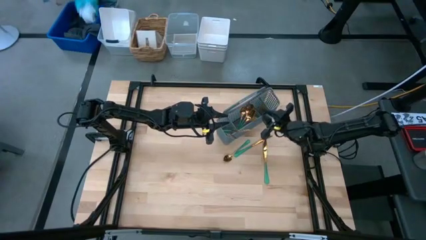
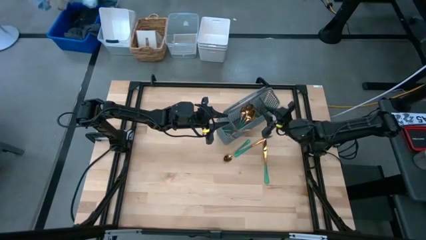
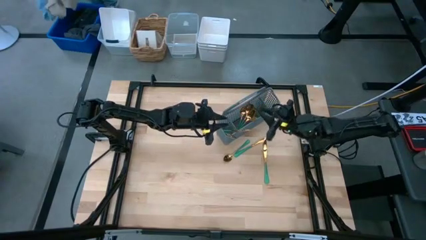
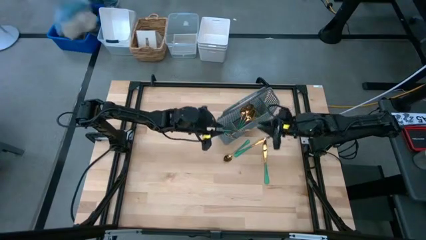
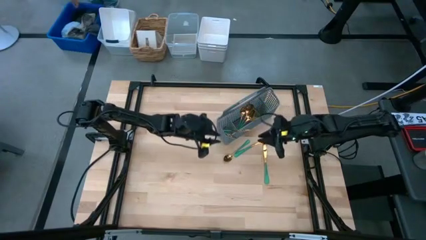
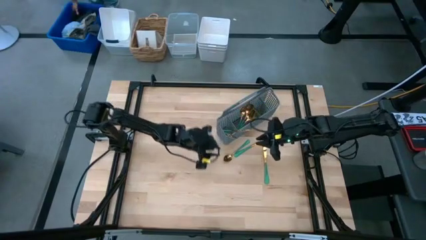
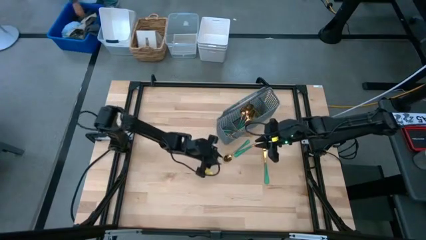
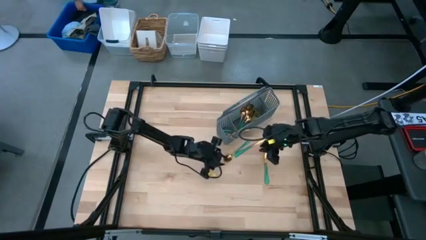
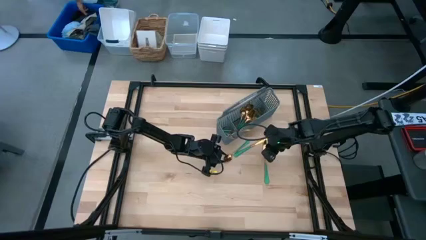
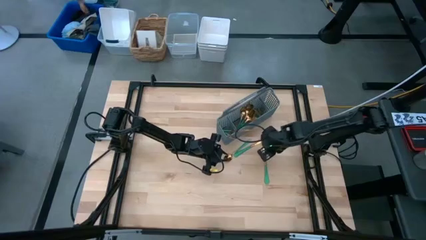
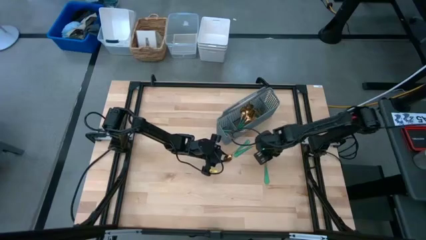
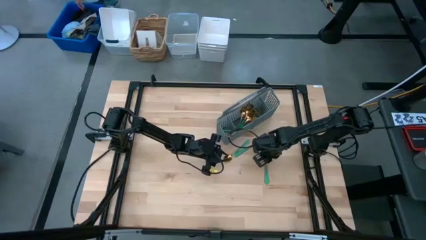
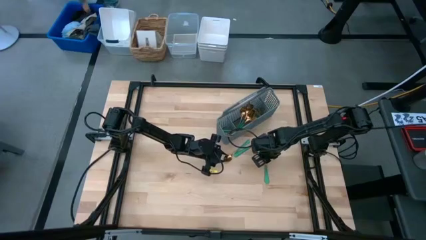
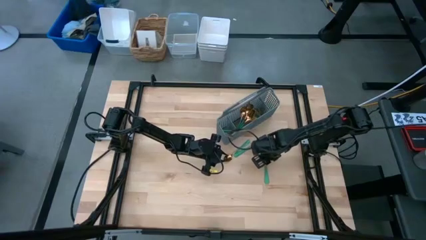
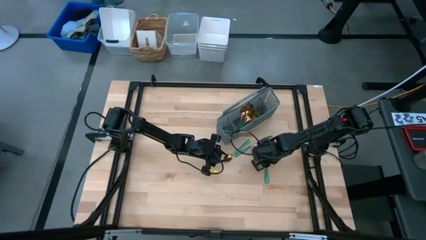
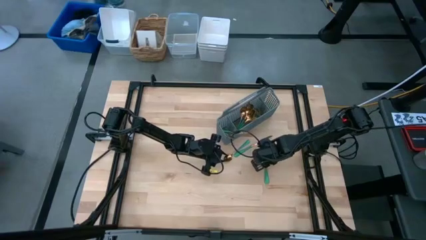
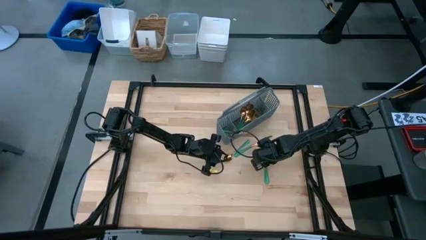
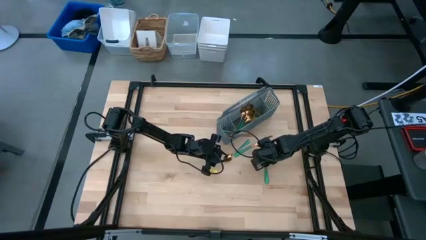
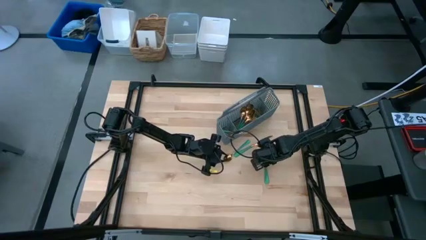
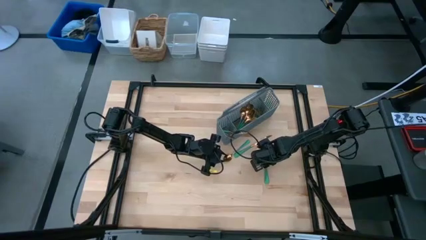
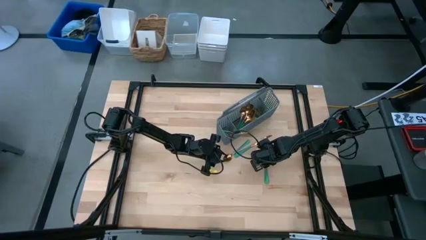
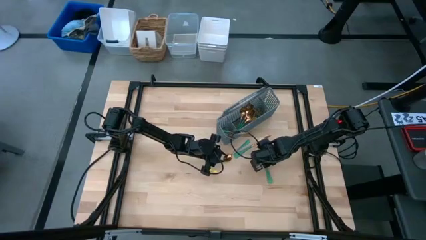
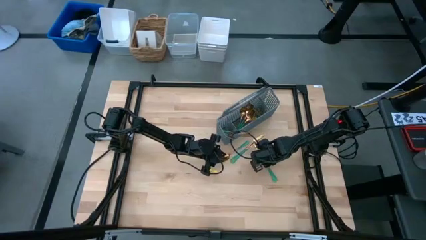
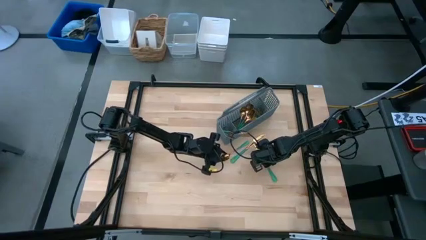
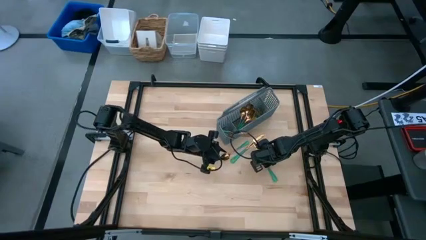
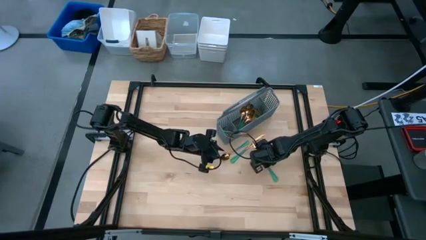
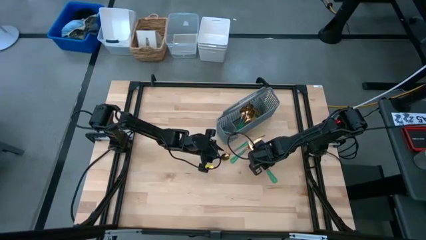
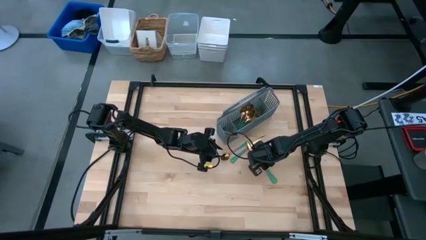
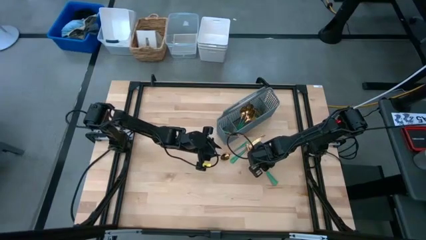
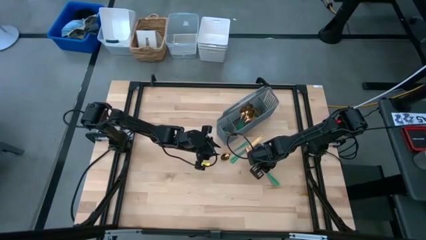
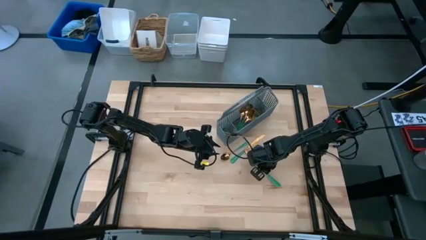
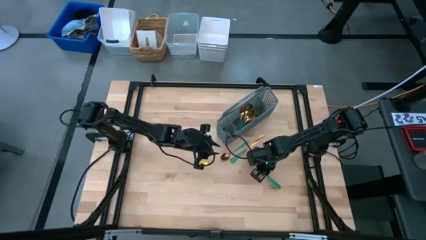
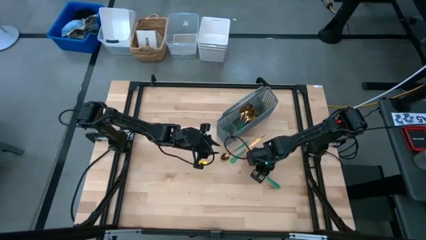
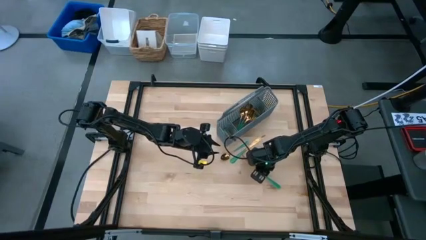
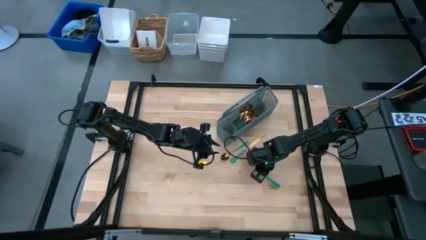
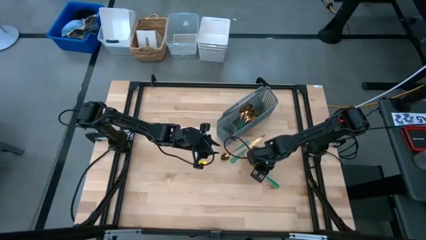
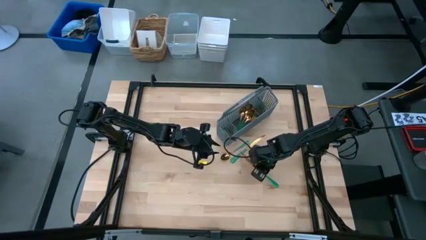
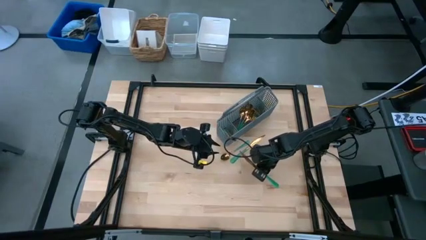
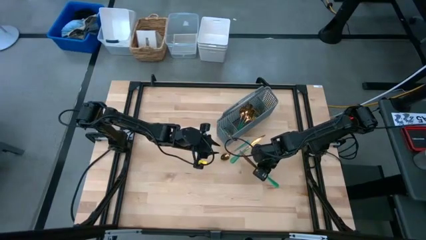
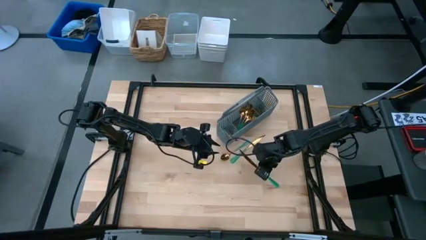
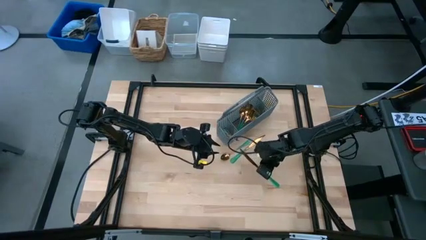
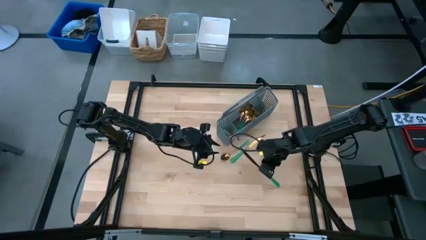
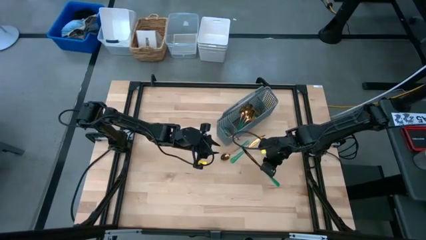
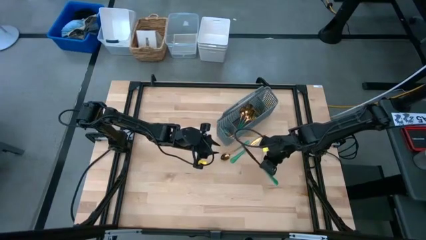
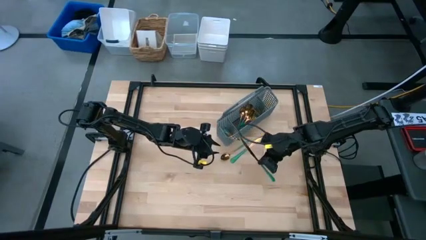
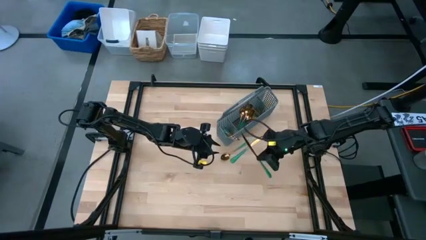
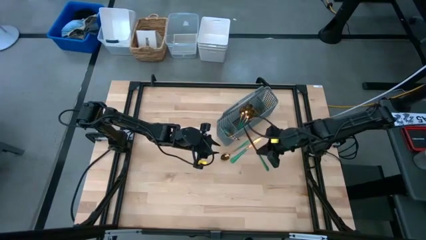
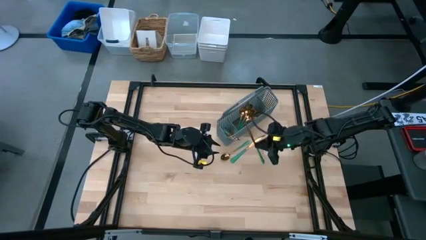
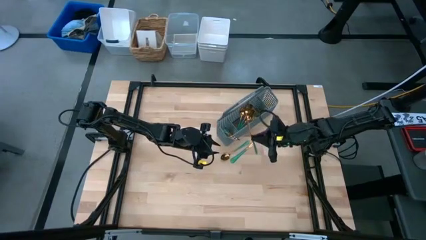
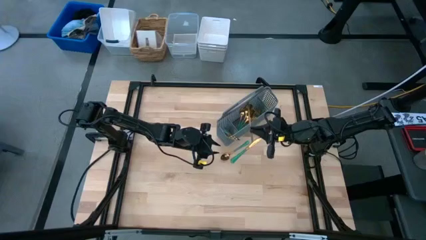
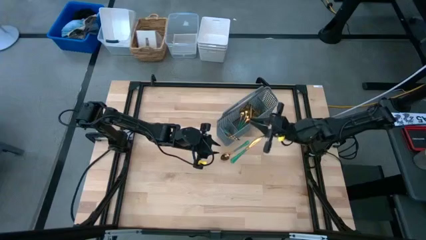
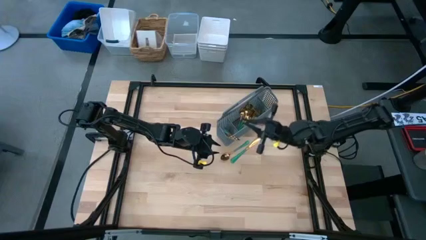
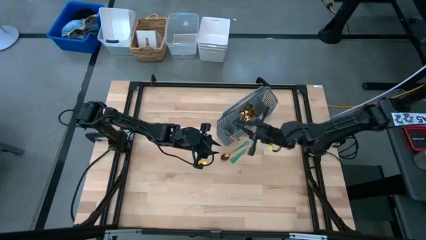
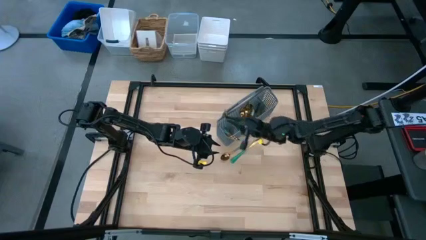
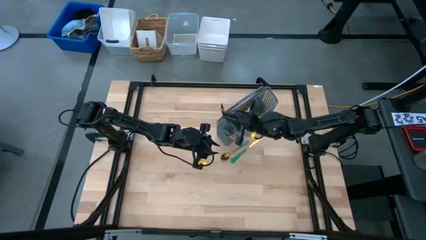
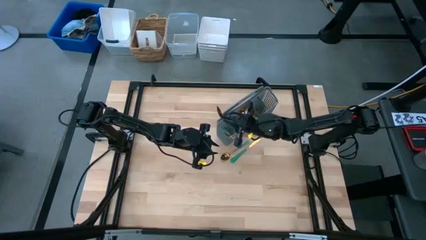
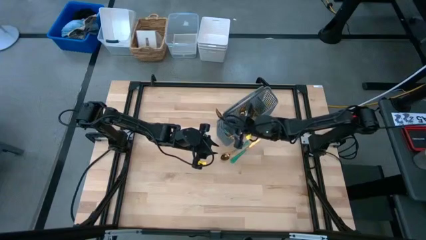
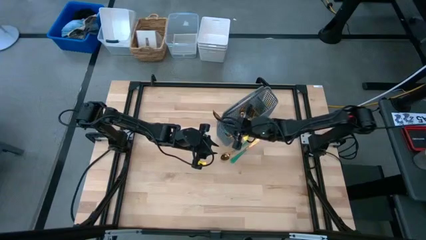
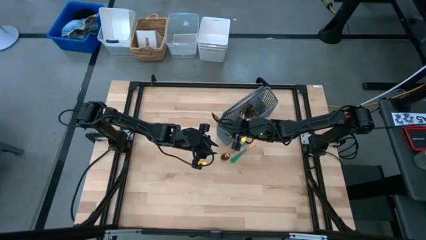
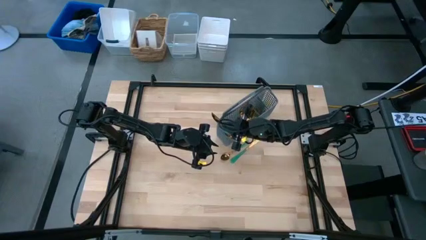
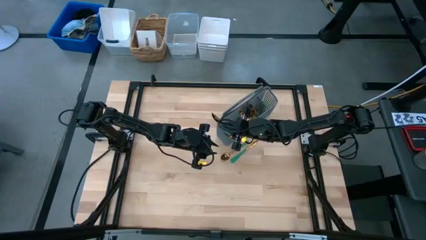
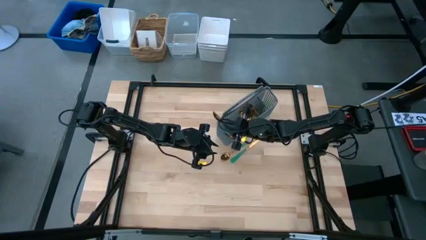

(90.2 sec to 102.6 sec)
Task: Sort silverware
Put the bottom right knife into the basket

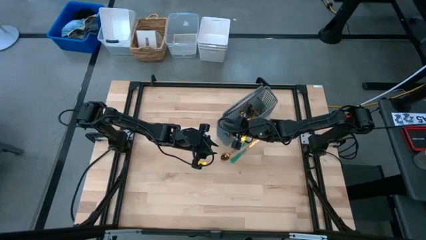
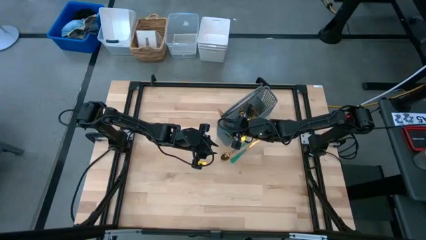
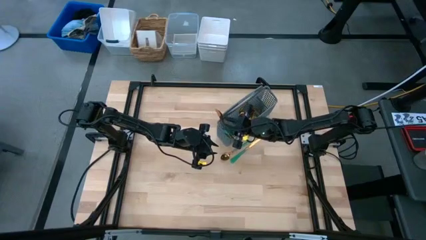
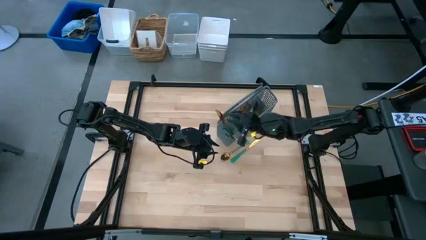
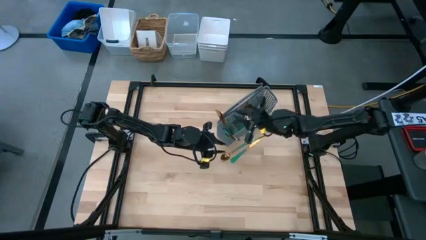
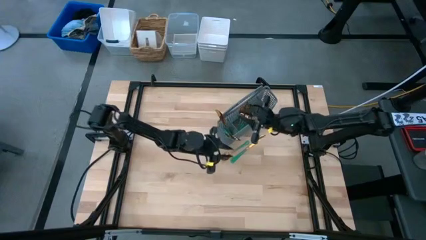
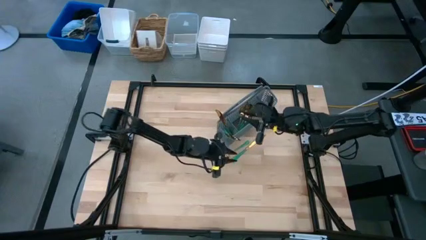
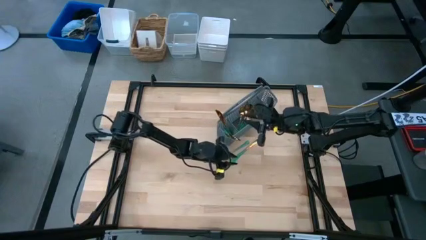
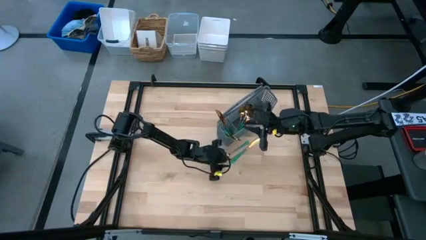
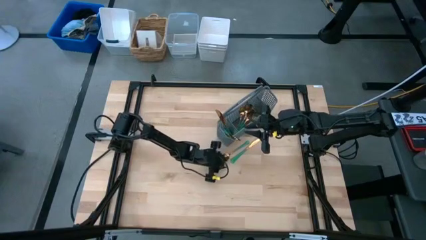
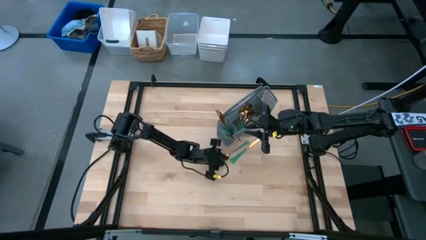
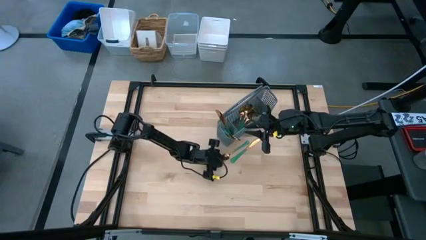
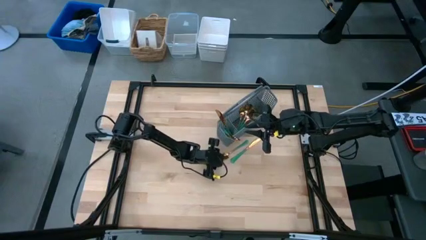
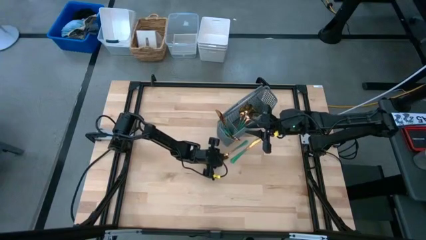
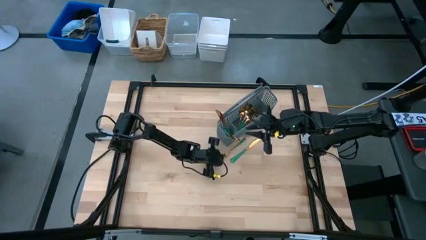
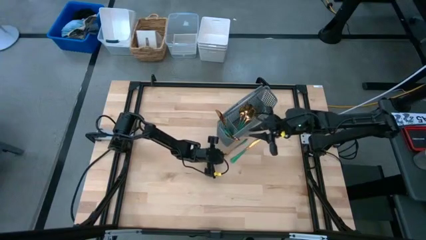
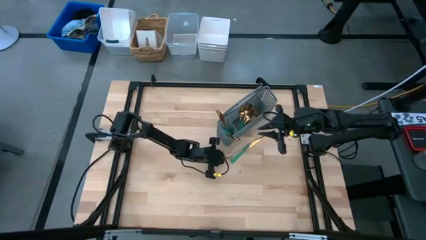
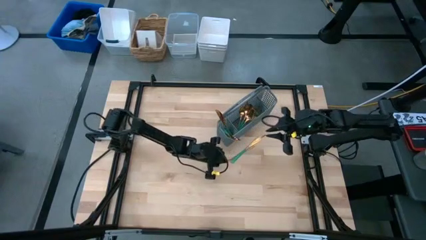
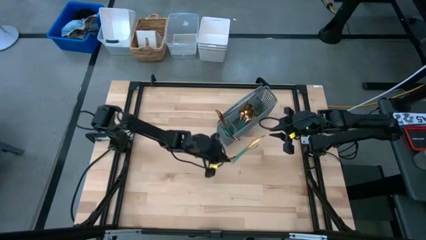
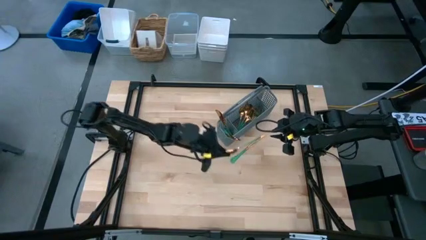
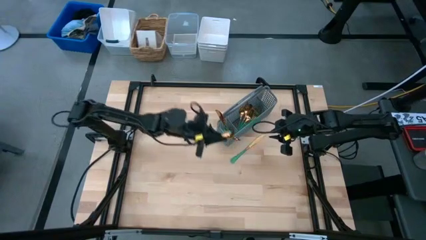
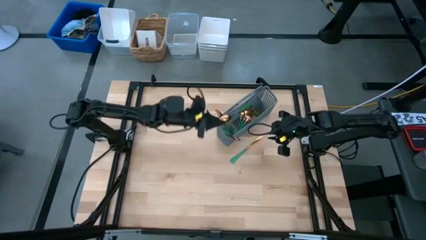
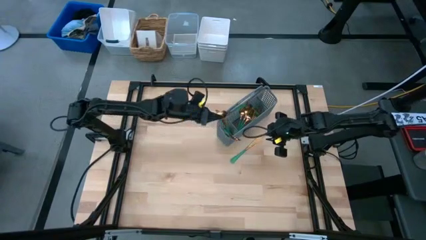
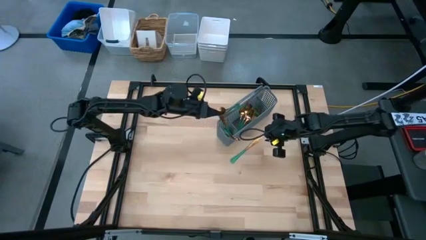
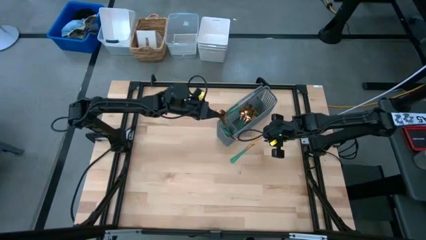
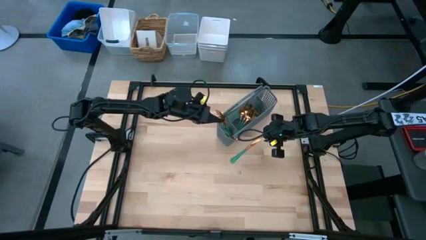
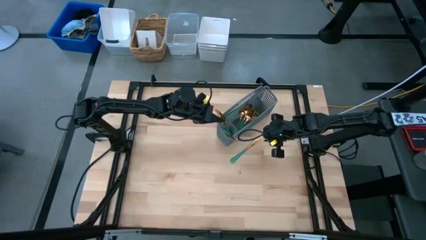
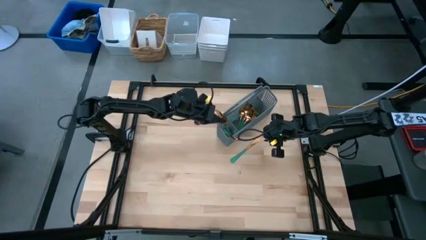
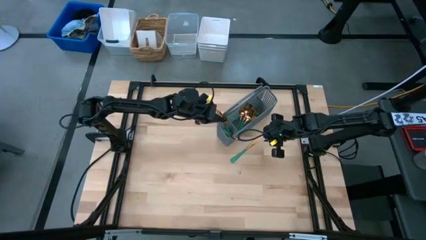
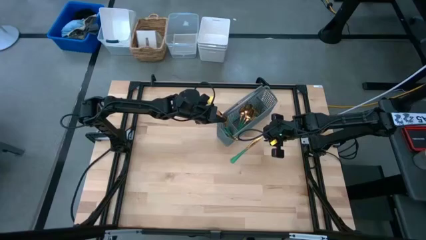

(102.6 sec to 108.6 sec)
Put the middle spoon into the basket
